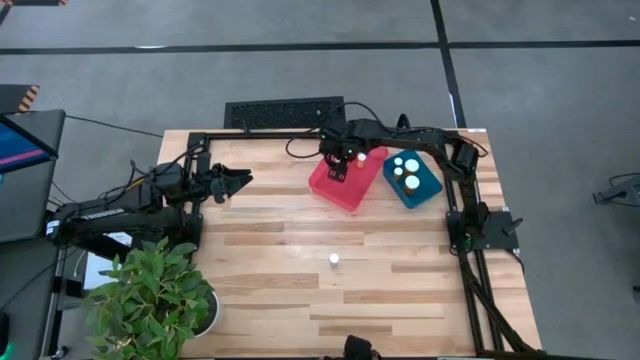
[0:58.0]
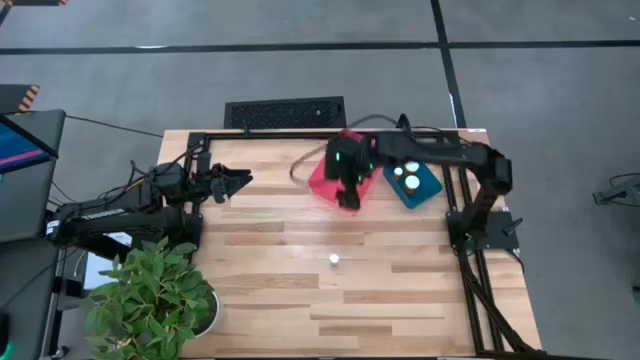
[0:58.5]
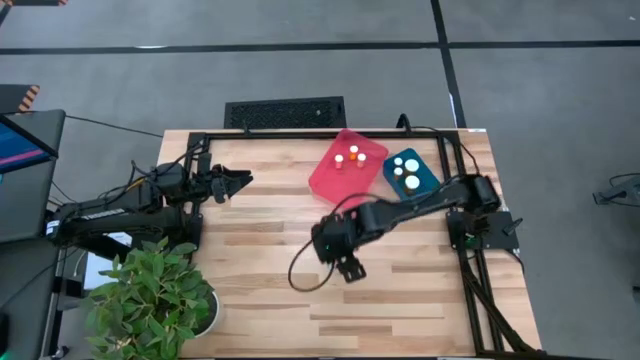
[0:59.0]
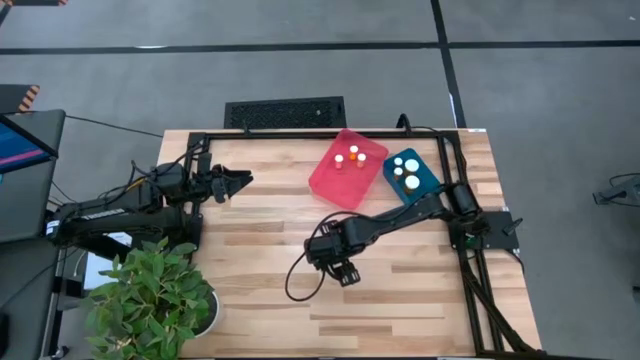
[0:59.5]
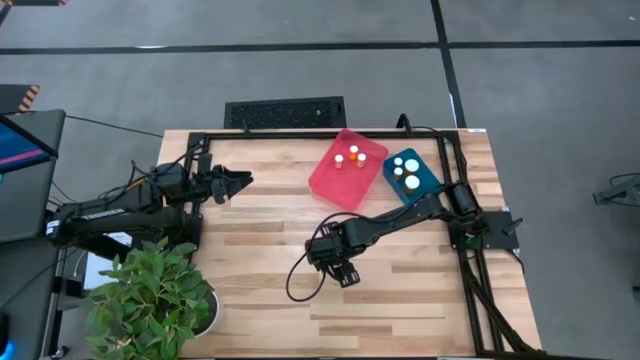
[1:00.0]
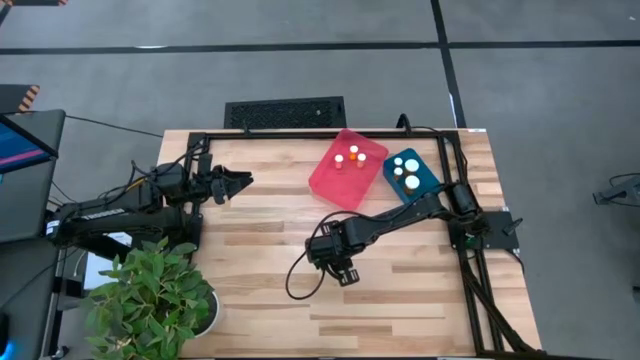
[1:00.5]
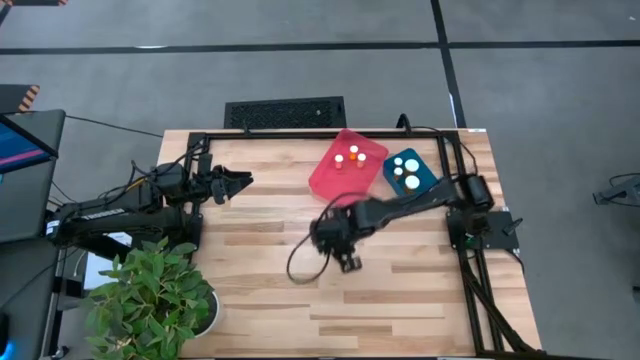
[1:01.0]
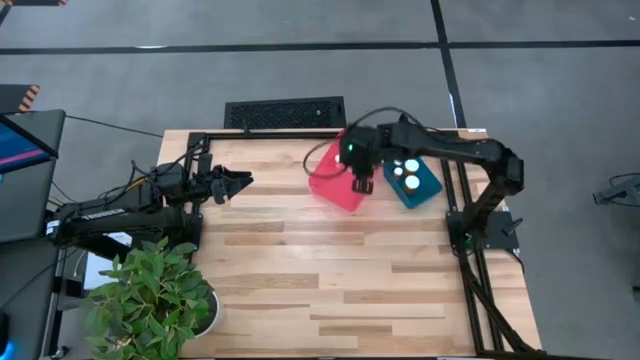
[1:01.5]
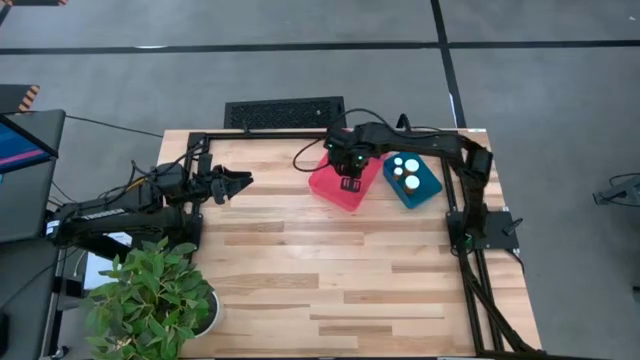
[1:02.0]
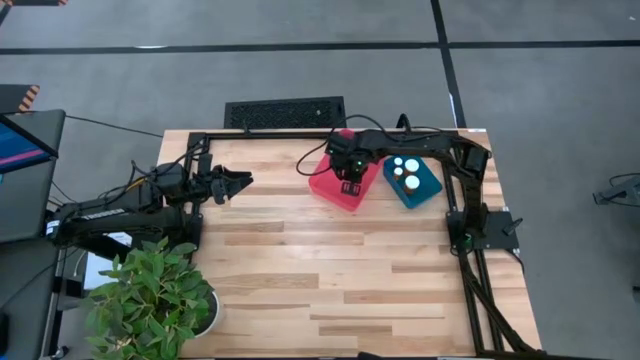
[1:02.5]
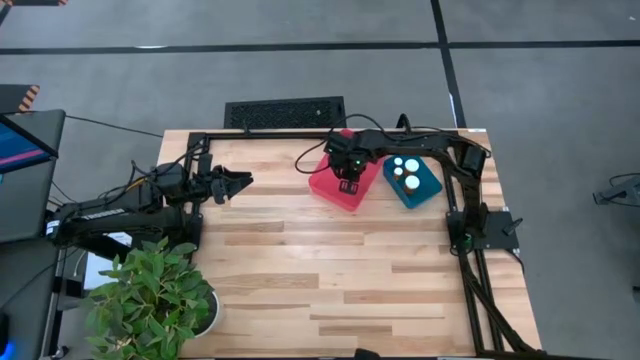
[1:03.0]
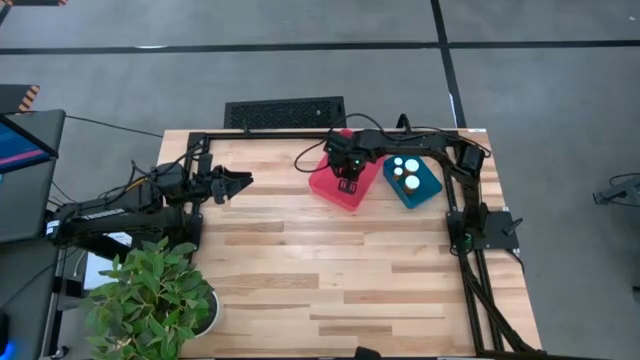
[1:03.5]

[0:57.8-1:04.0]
Task: Pick and place medicine bottles into bin by pill shape (circle, oval)
Put the green tablet bottle into the red bin

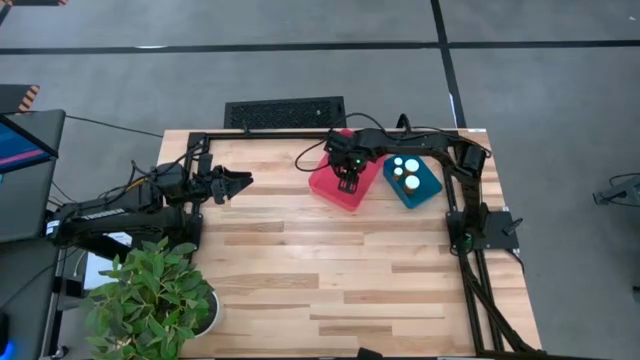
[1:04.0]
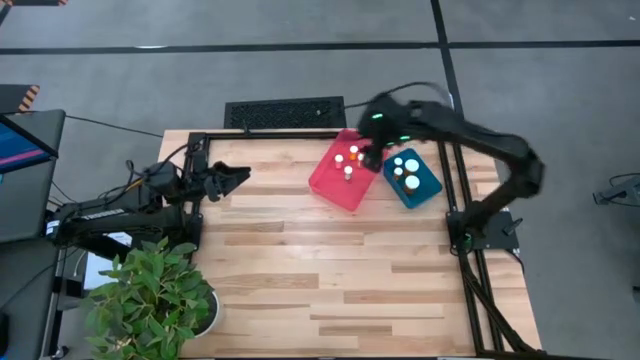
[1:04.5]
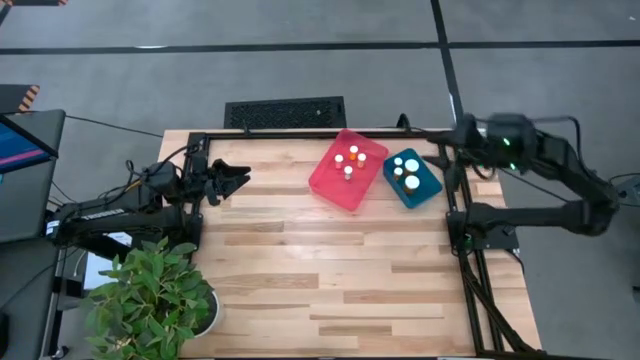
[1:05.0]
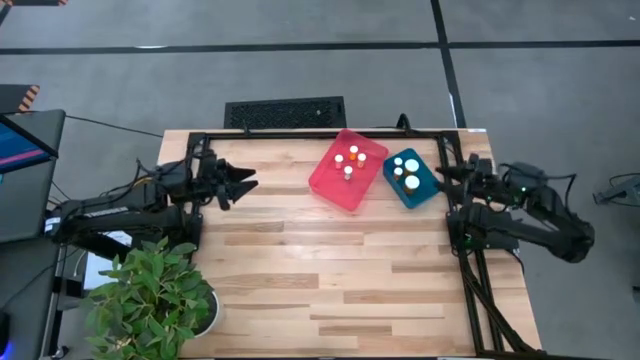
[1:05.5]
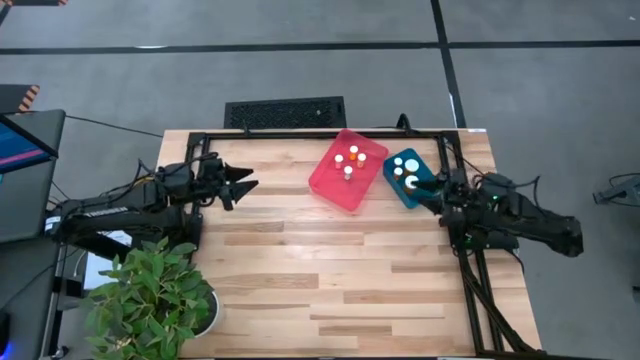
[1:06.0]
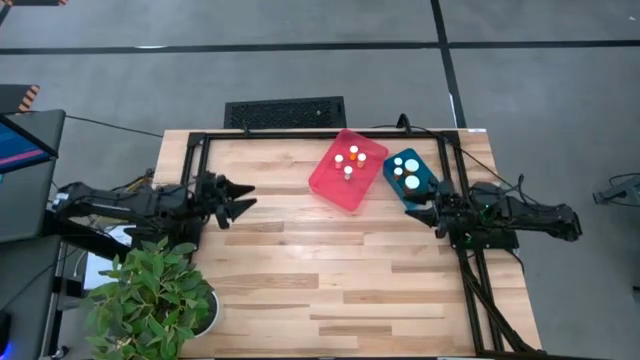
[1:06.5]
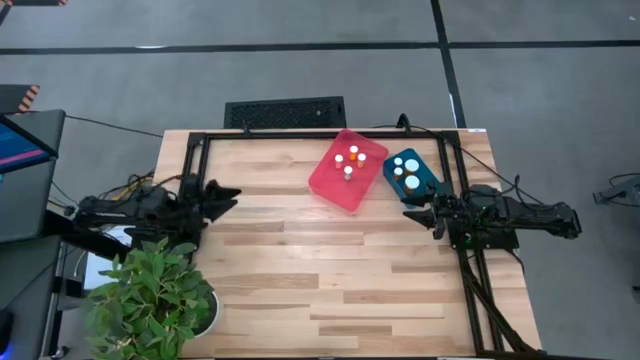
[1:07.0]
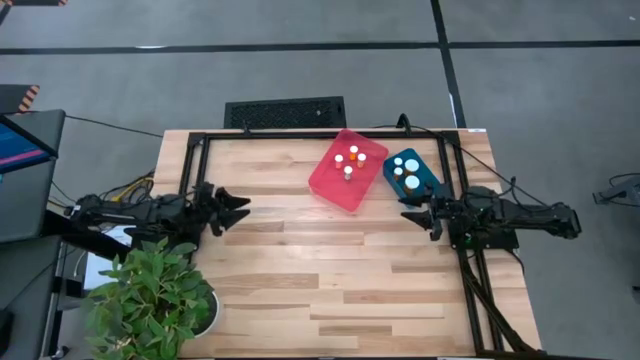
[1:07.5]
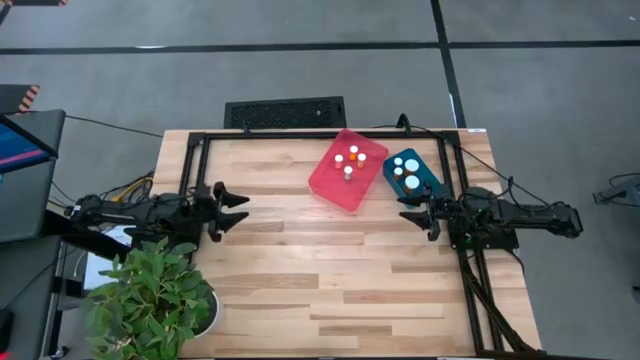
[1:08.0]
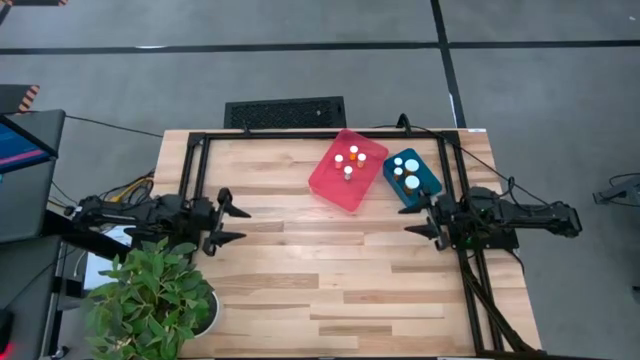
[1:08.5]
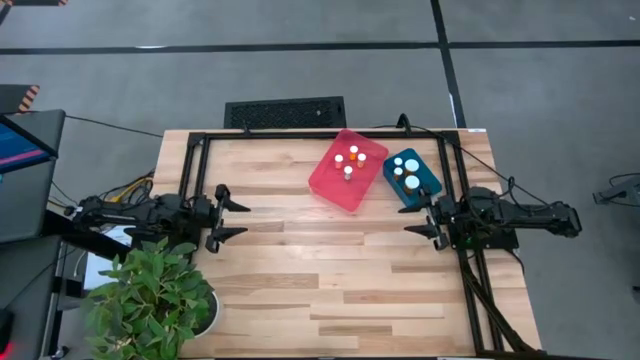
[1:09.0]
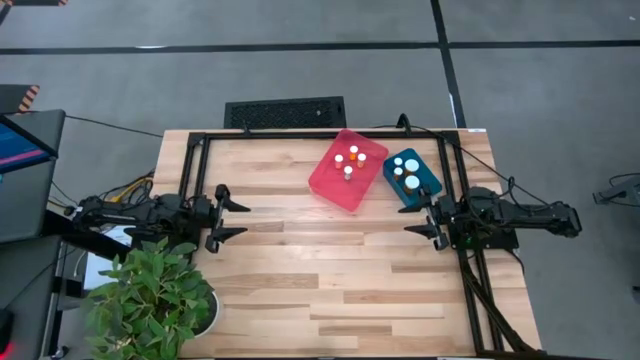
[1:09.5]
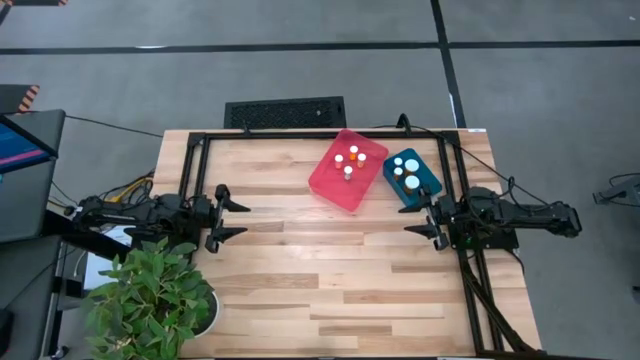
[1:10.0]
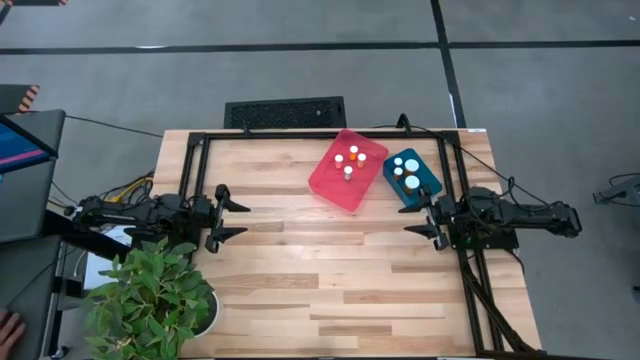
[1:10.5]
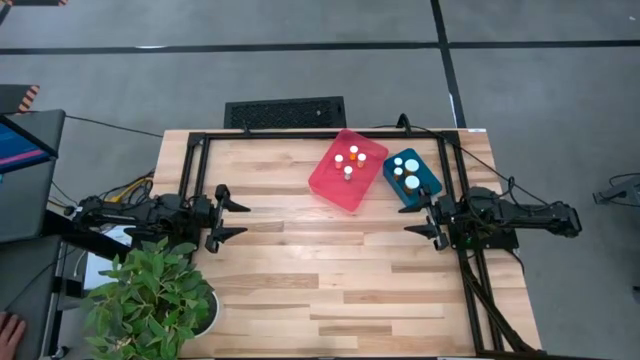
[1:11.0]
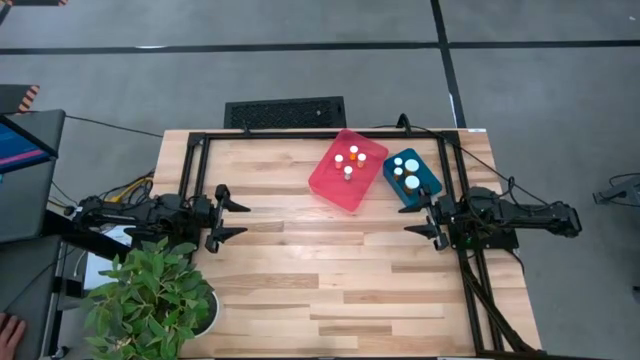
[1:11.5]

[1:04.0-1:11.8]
Return to Home Position

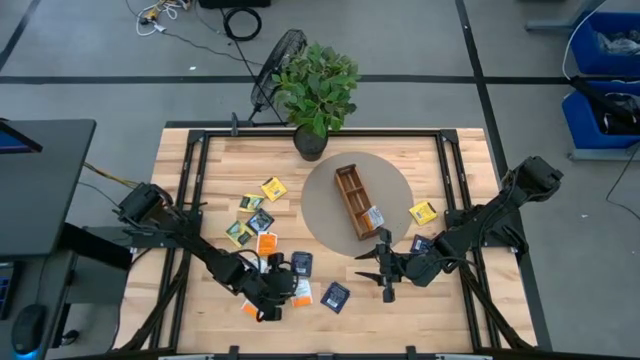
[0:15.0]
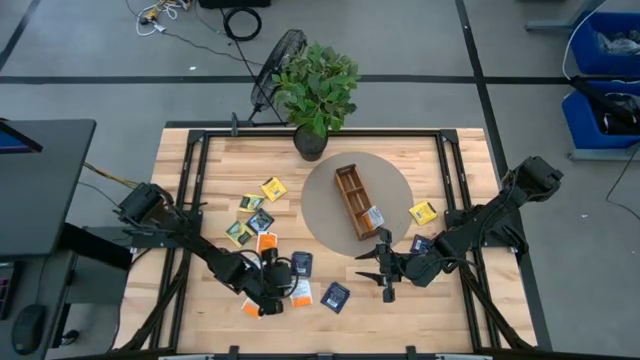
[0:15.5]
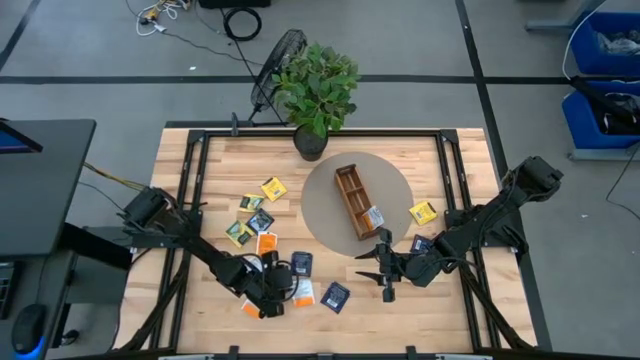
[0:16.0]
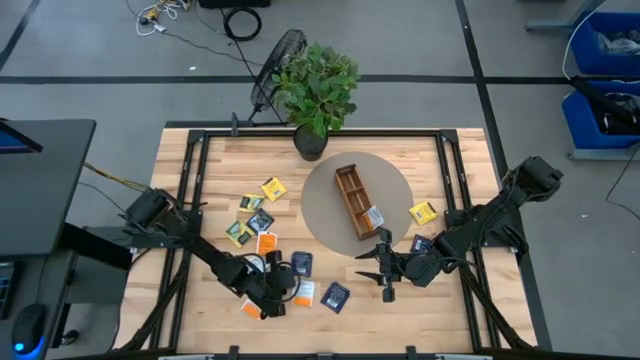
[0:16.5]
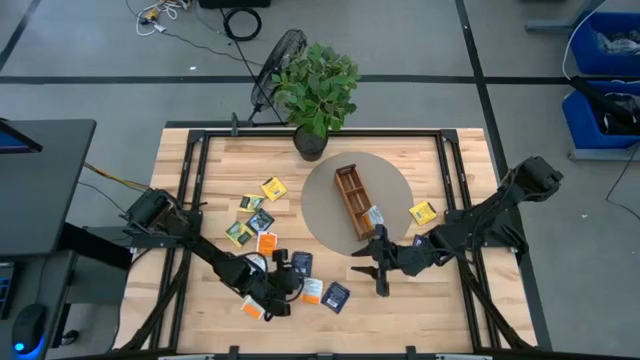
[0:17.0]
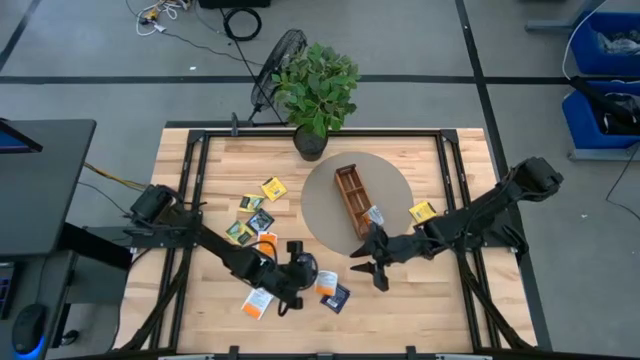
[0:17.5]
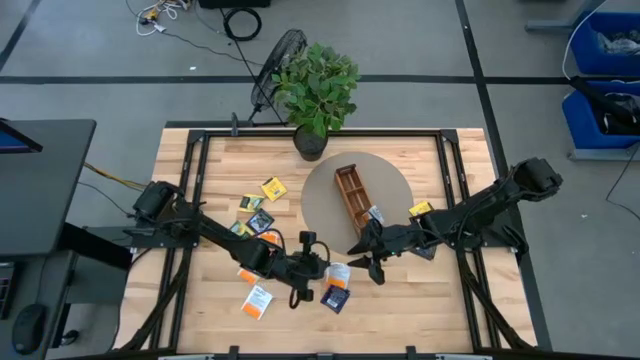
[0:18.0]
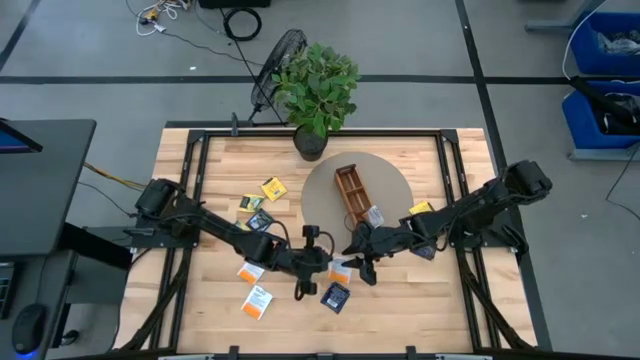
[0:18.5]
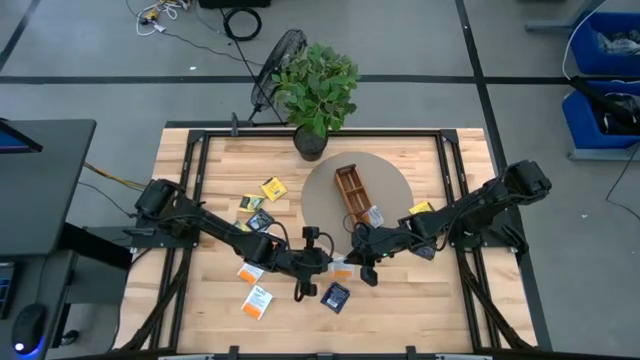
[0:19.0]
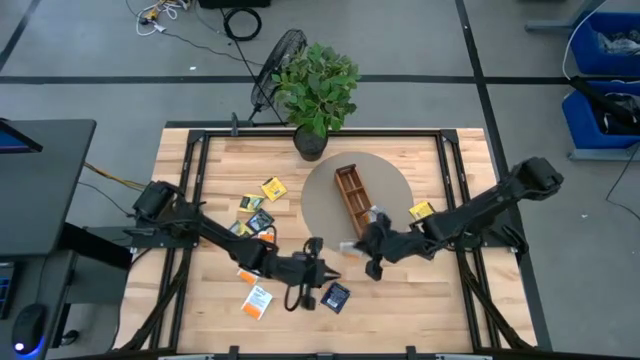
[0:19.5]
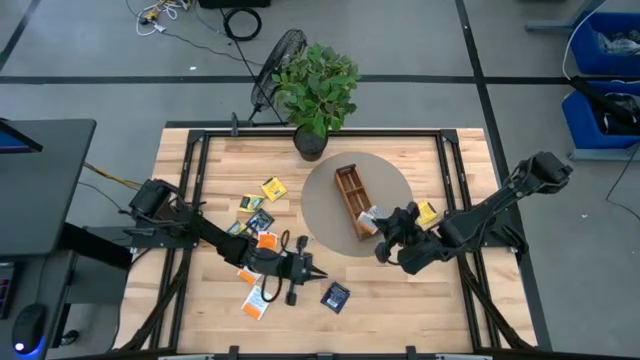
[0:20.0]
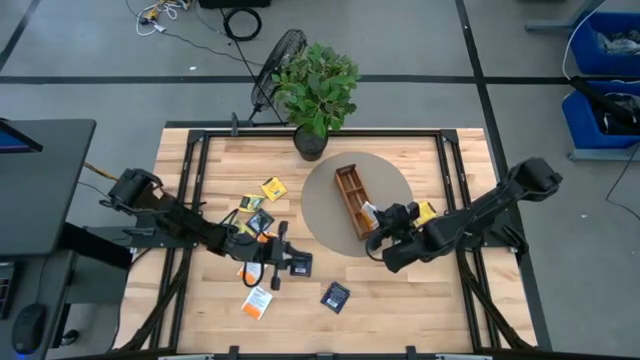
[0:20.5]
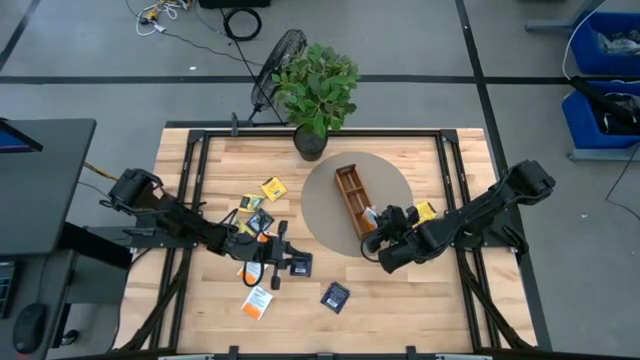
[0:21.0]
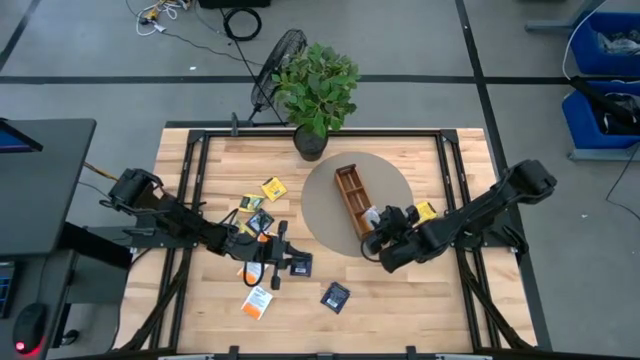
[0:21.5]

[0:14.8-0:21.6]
Task: Pick & Place Tea
Put the white tea bag into the bottom section of the wooden organizer
